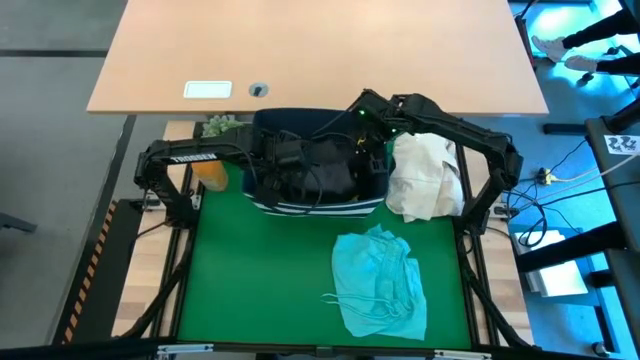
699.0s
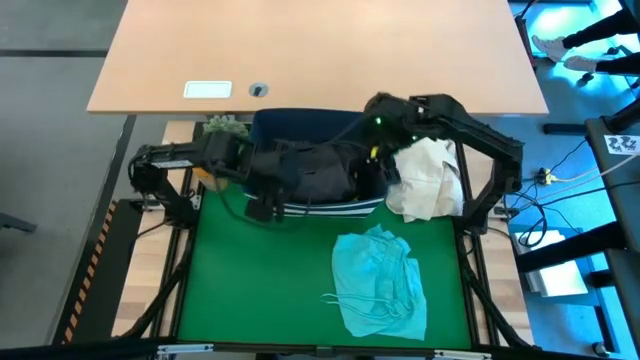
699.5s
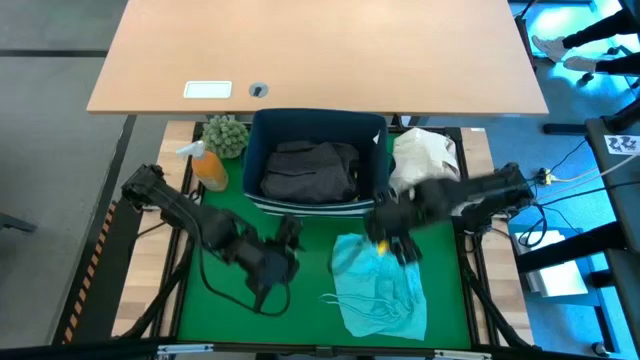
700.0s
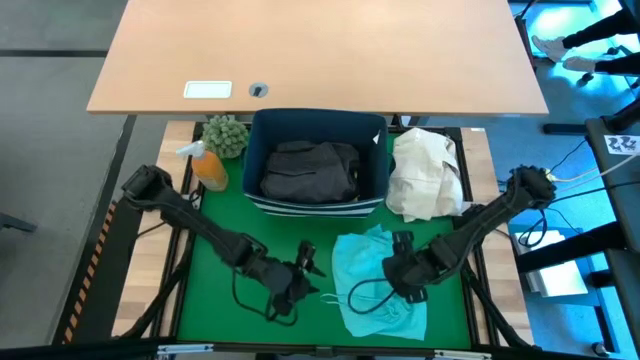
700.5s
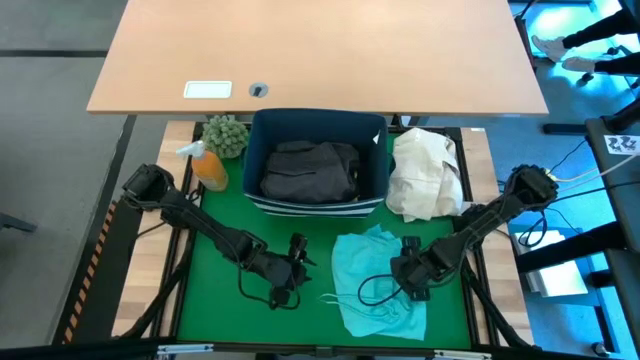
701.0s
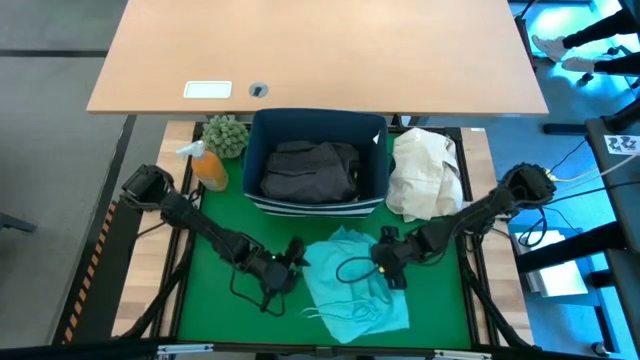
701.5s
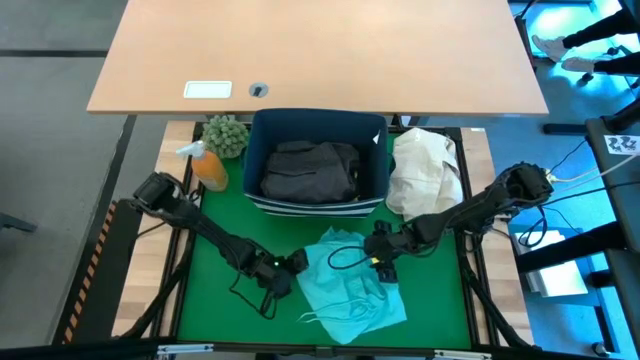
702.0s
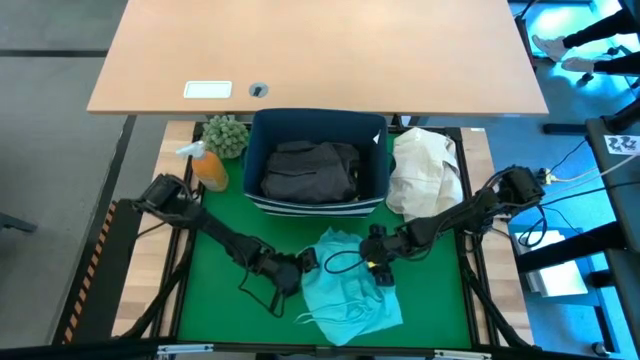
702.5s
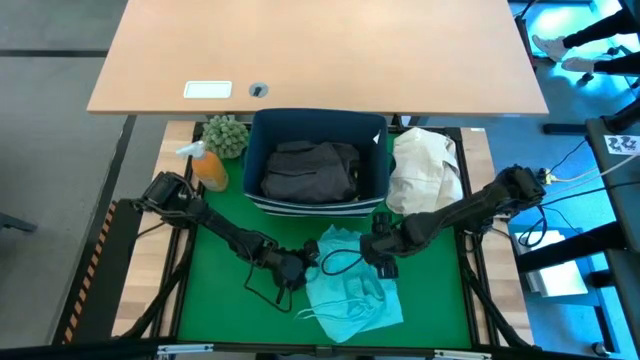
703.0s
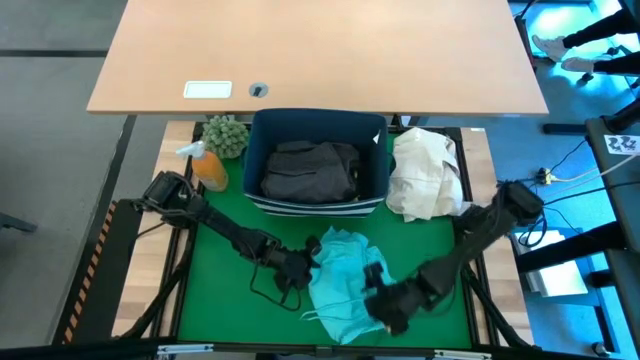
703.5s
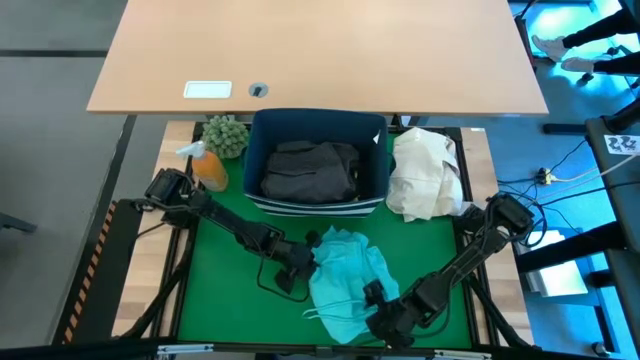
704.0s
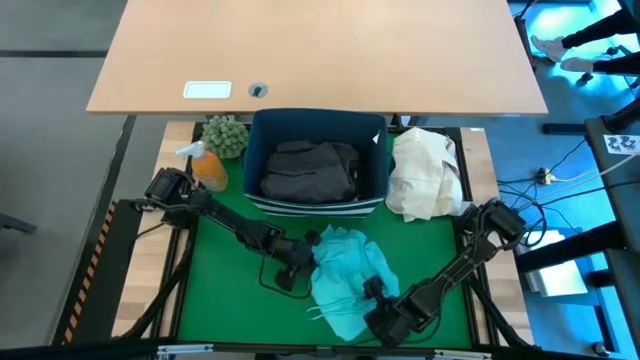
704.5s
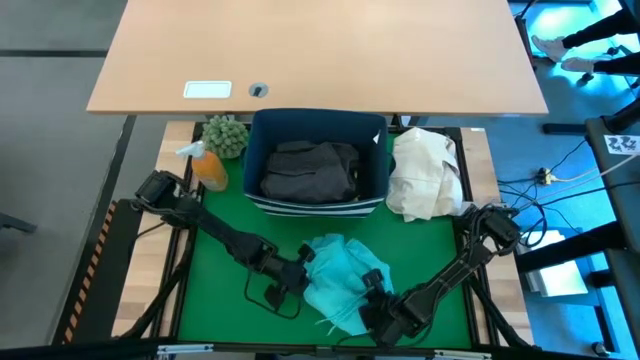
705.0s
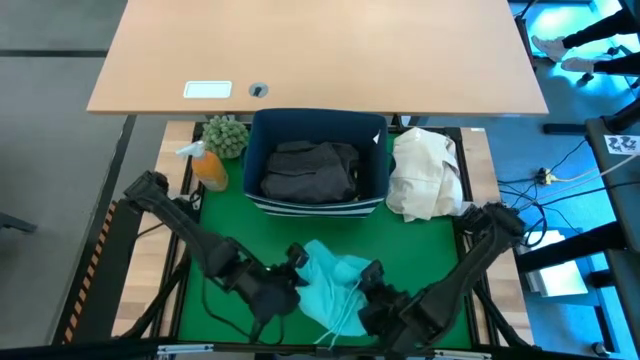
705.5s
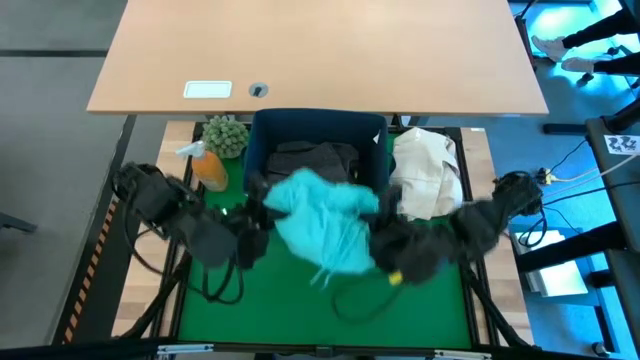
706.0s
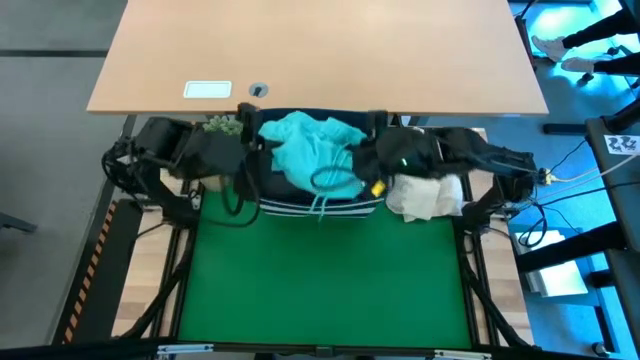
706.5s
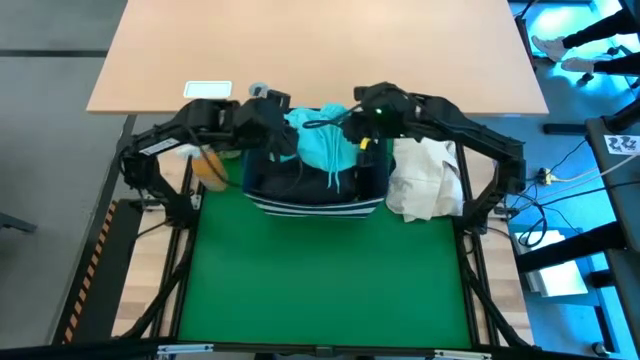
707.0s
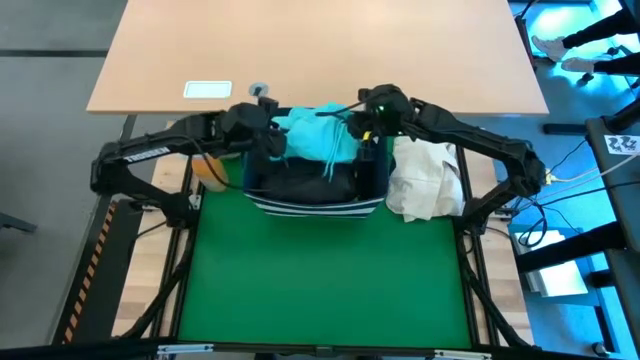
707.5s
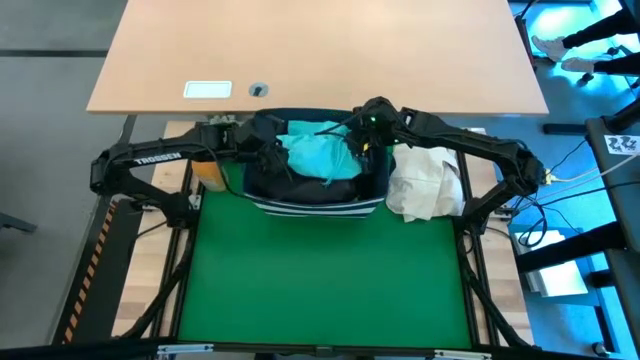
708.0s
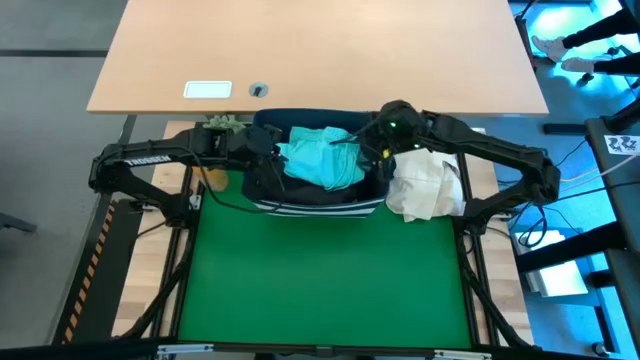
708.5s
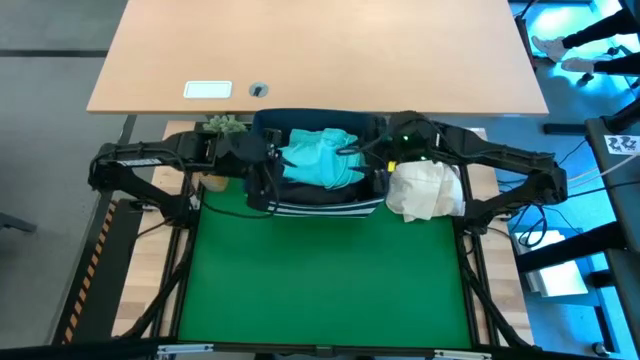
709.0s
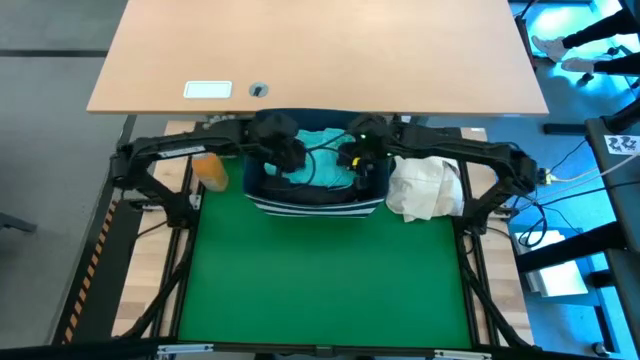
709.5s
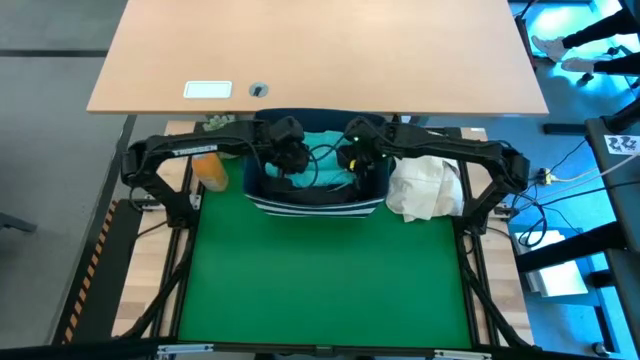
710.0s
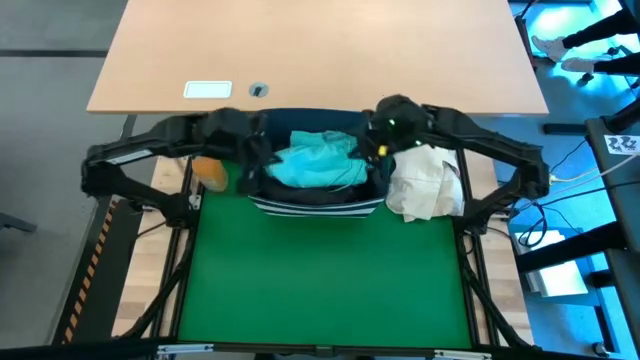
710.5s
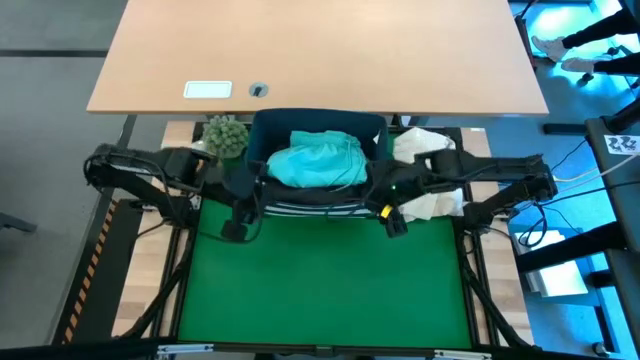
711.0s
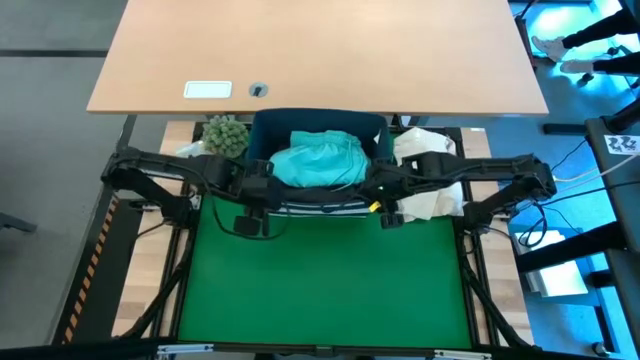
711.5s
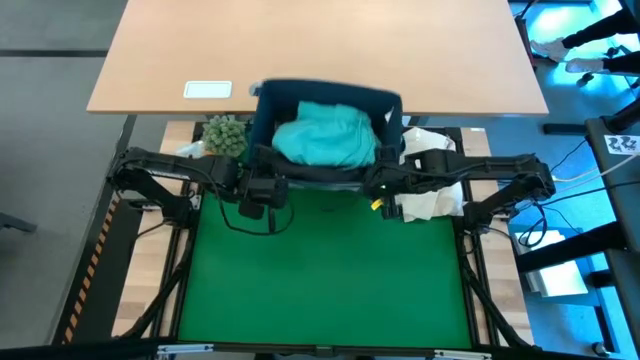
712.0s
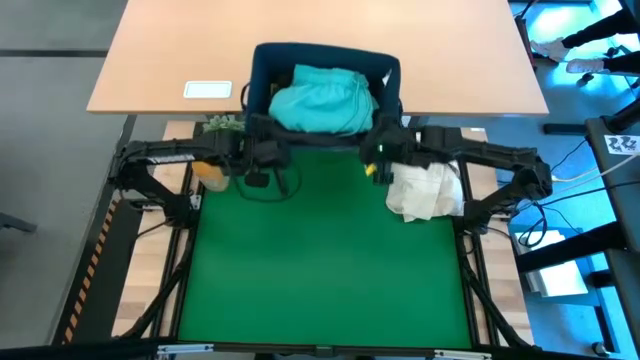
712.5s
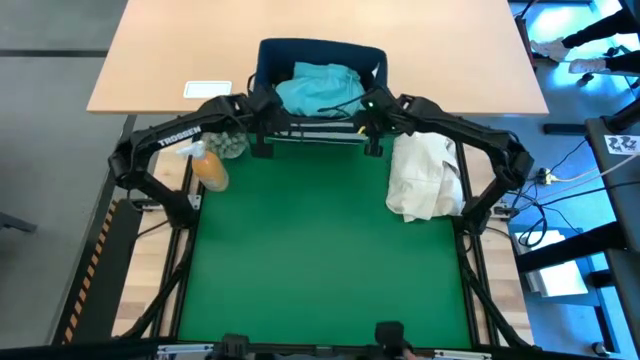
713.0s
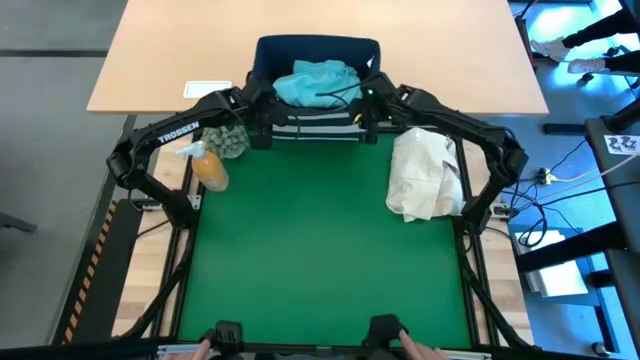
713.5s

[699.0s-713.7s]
Task: Fold laundry
Put the blue shorts into the laundry bin
